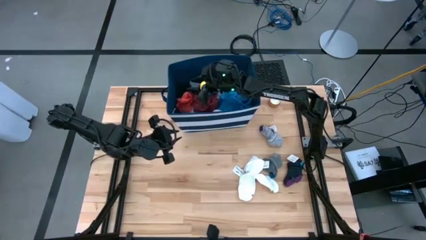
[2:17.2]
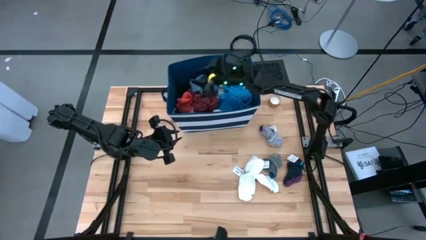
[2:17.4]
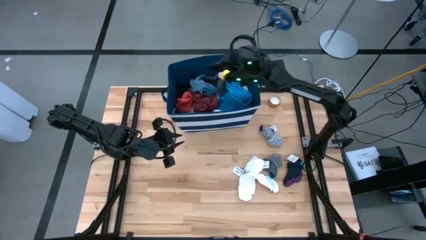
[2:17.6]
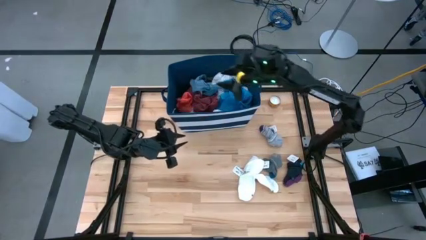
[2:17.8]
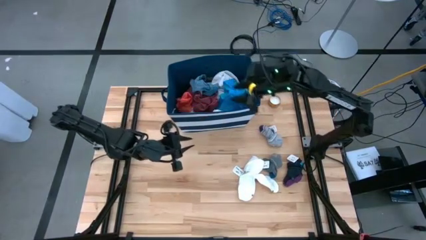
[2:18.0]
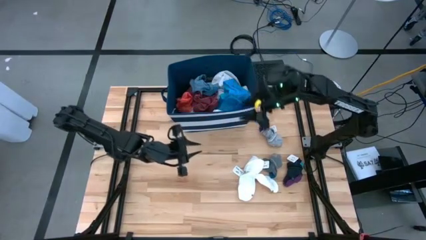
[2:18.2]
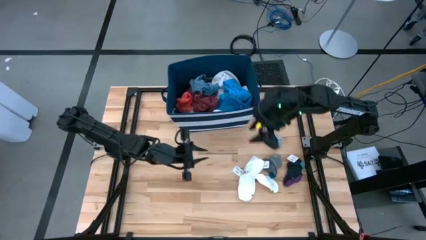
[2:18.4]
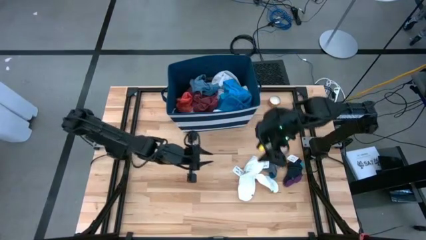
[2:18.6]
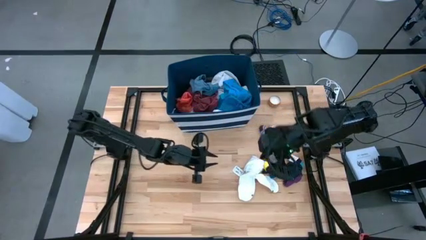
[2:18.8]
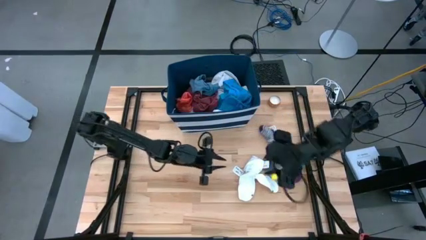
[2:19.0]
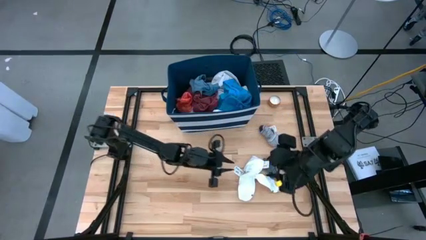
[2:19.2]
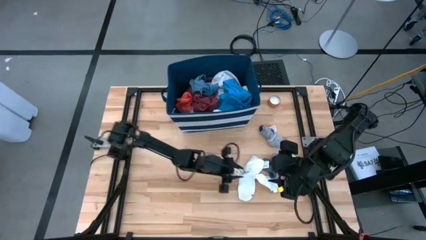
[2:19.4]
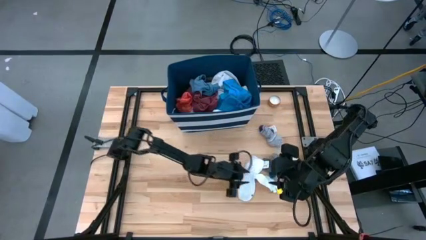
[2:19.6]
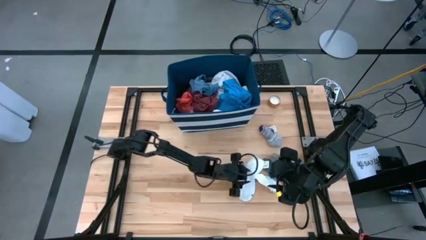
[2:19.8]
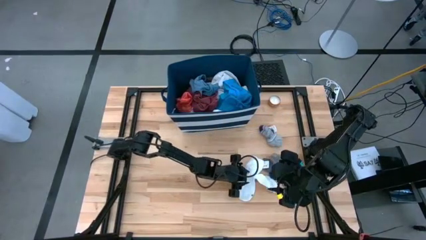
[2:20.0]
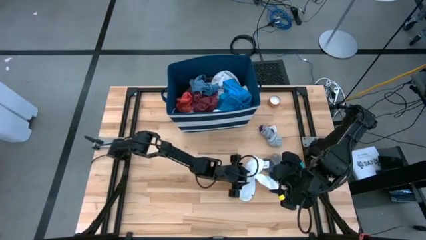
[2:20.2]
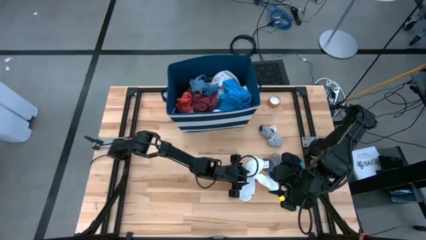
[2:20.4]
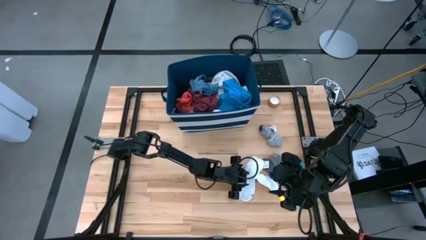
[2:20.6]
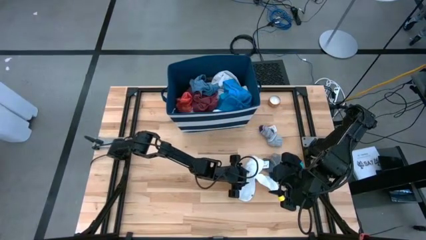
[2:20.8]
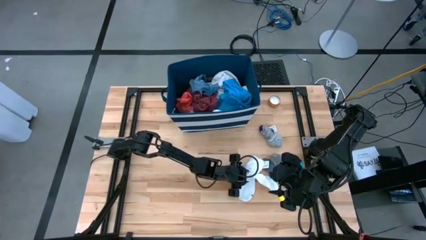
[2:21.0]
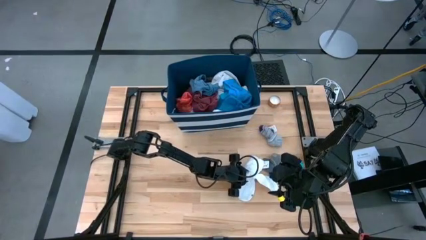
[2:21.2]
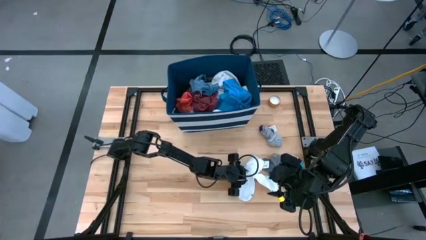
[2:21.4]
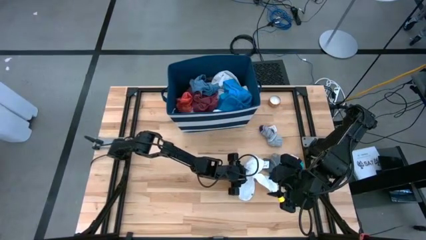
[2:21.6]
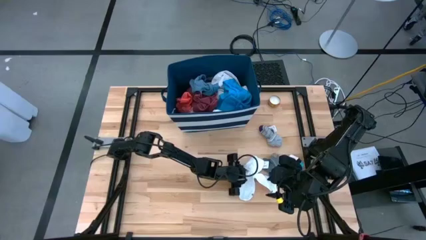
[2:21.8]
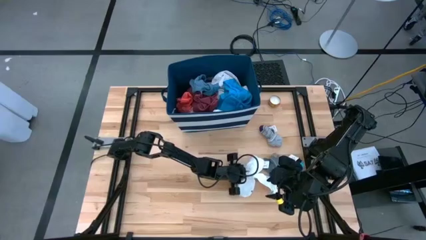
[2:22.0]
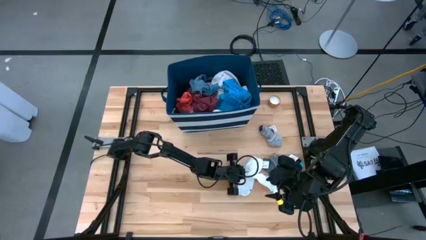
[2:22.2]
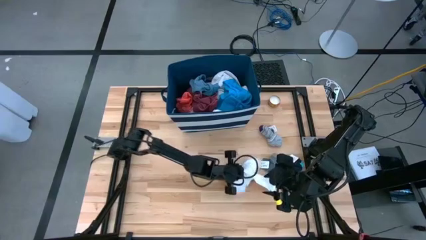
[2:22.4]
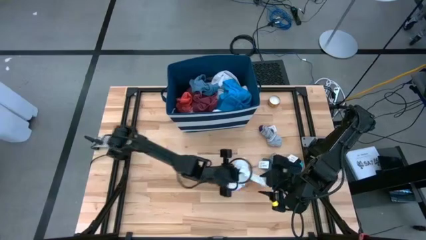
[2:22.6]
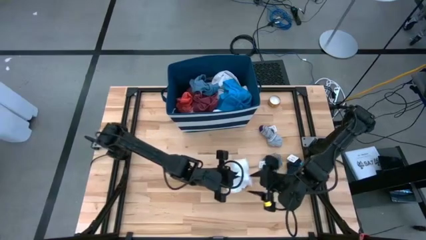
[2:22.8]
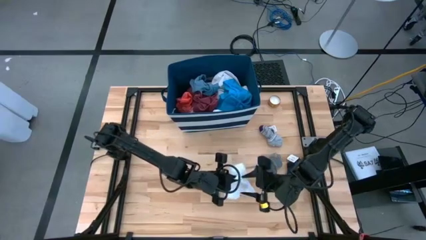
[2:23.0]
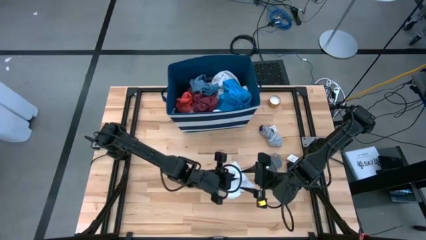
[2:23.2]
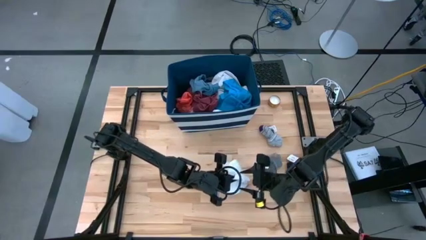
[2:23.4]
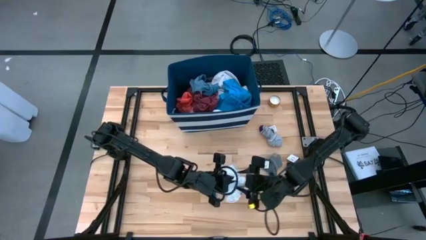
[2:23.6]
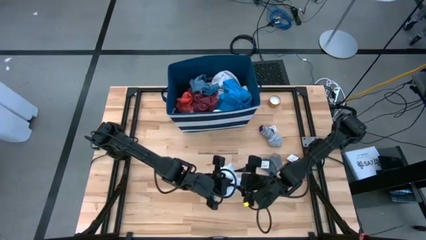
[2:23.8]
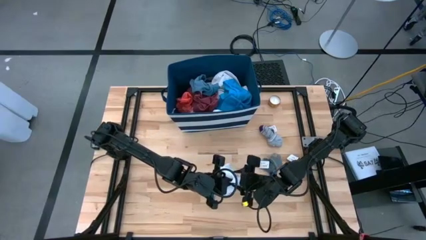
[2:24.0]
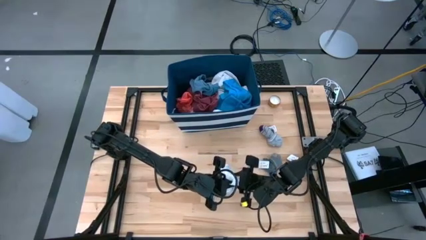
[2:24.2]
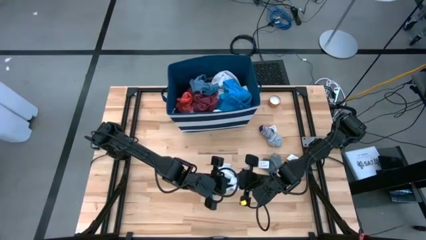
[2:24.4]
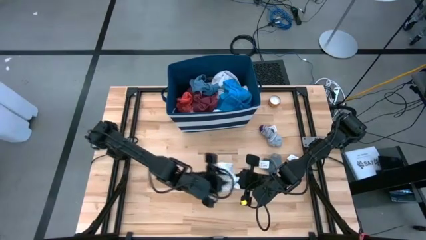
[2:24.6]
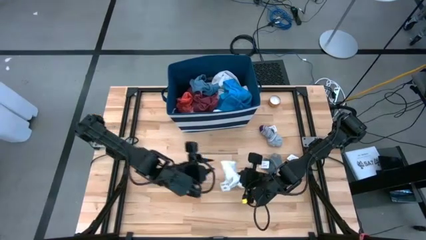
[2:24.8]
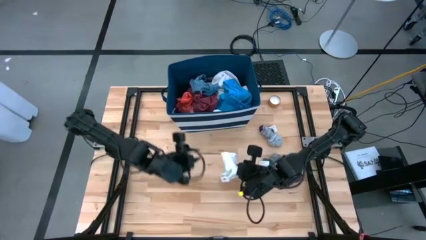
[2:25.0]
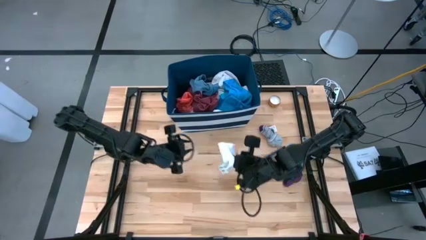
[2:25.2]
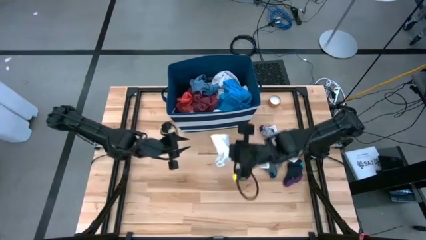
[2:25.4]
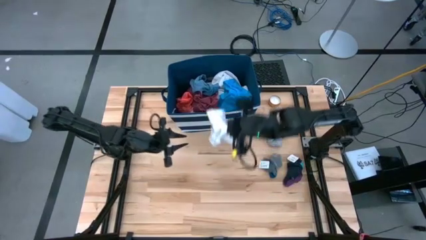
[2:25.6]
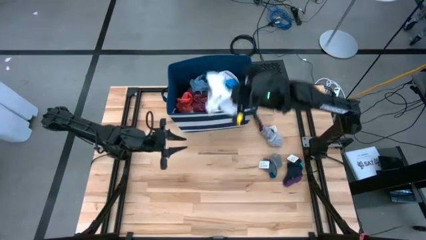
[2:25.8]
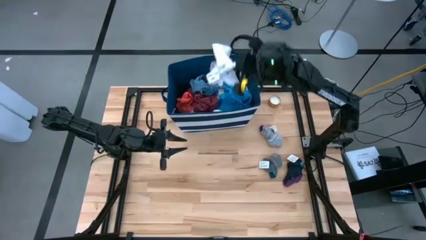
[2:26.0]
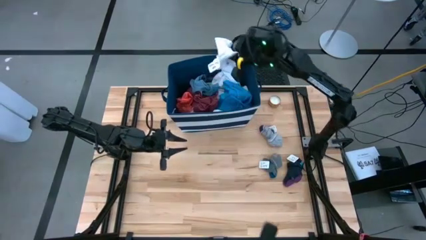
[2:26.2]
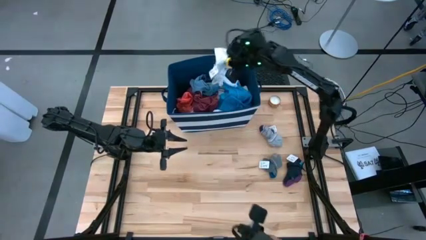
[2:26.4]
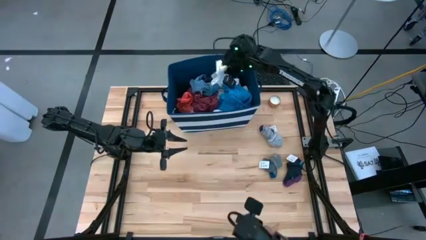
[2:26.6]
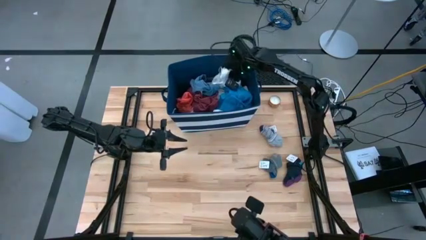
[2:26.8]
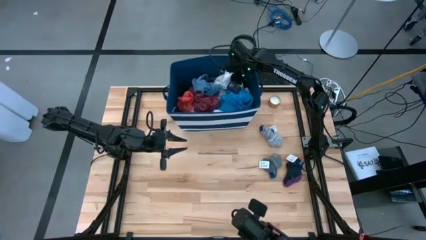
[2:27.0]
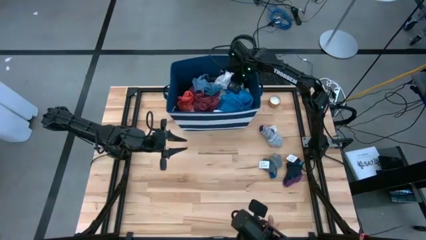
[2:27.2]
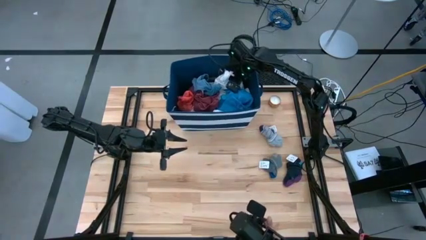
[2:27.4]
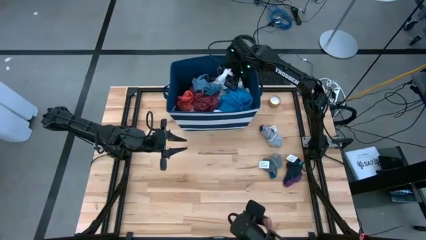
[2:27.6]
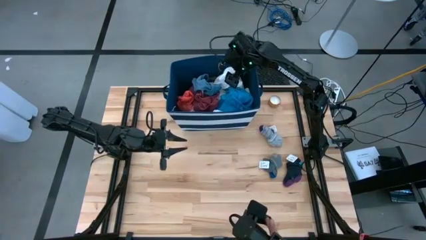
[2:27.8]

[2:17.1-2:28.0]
Task: Sort clothes
Put the white socks into the blue laundry organizer

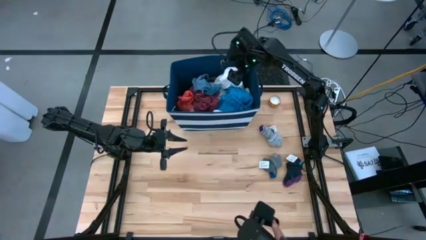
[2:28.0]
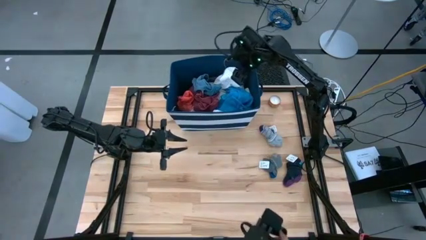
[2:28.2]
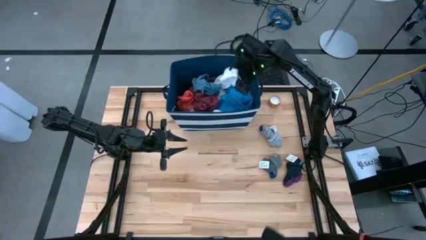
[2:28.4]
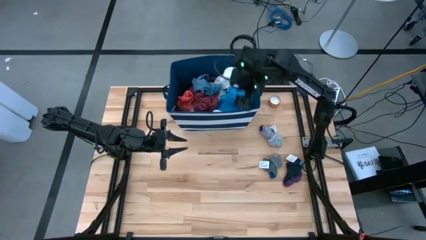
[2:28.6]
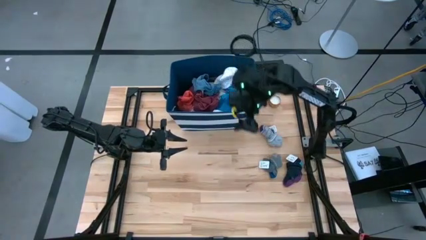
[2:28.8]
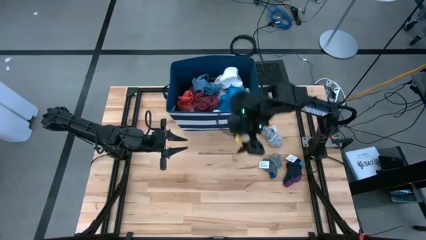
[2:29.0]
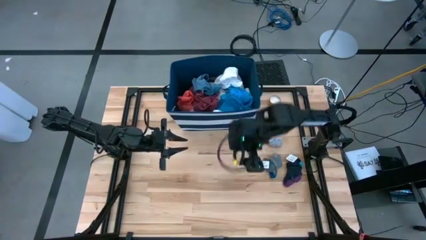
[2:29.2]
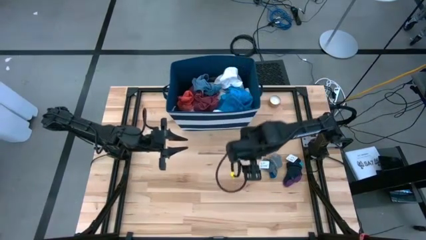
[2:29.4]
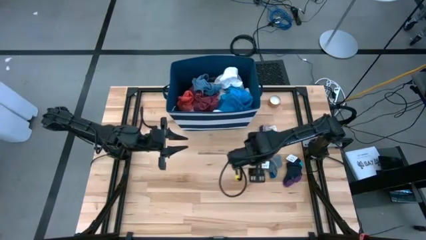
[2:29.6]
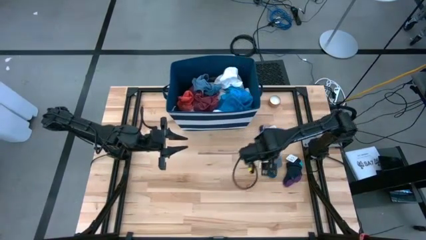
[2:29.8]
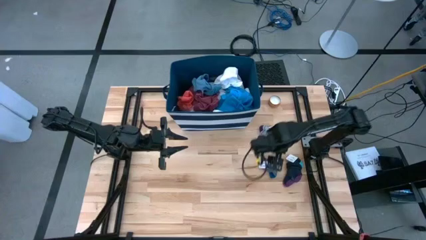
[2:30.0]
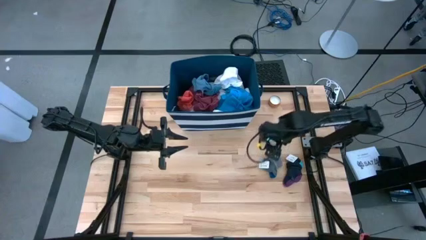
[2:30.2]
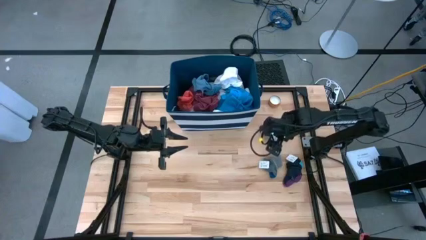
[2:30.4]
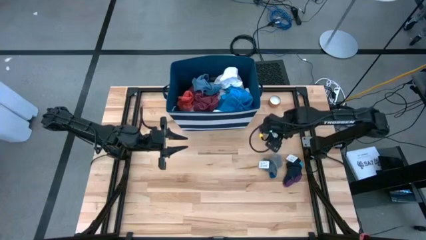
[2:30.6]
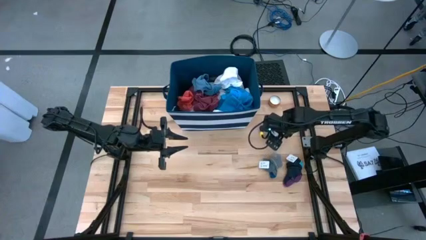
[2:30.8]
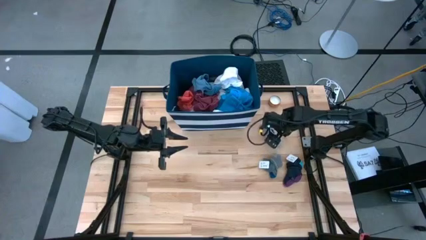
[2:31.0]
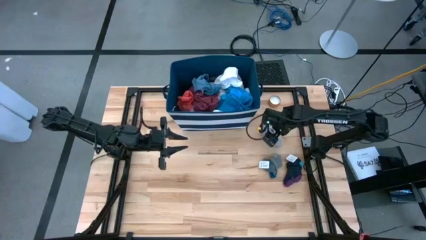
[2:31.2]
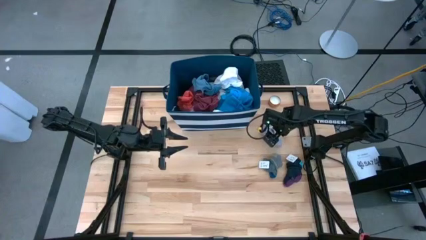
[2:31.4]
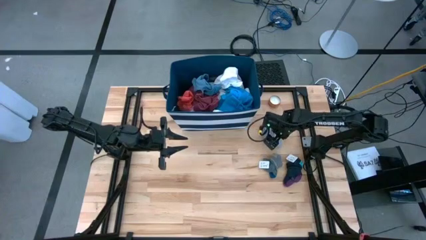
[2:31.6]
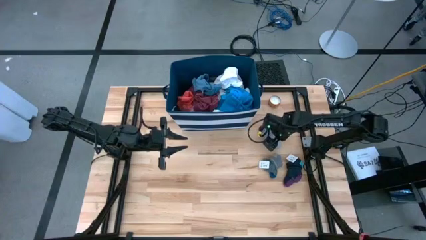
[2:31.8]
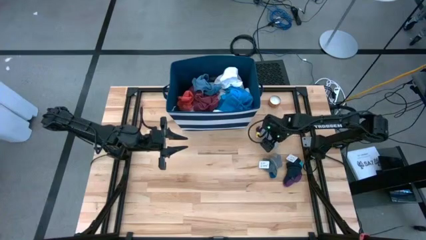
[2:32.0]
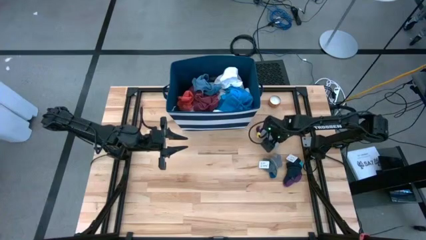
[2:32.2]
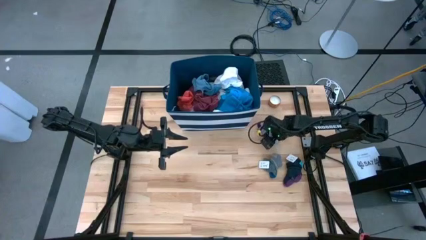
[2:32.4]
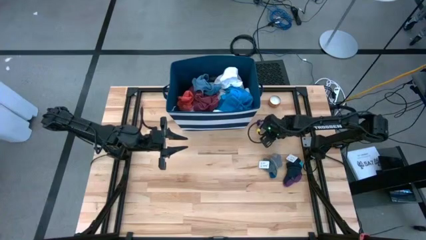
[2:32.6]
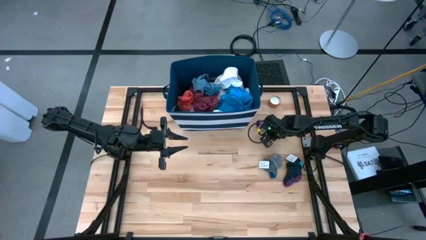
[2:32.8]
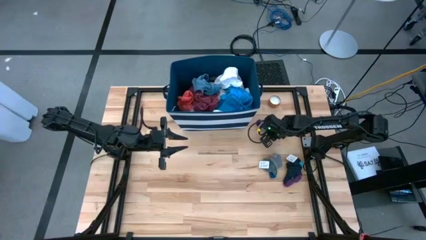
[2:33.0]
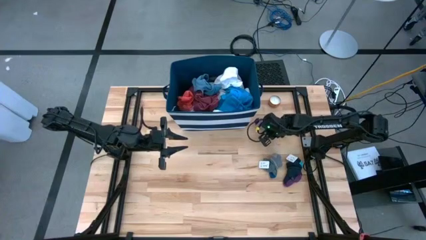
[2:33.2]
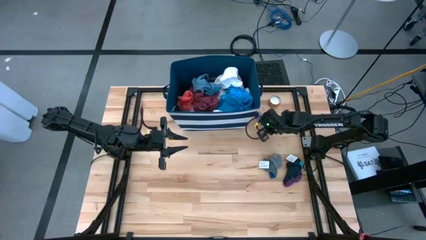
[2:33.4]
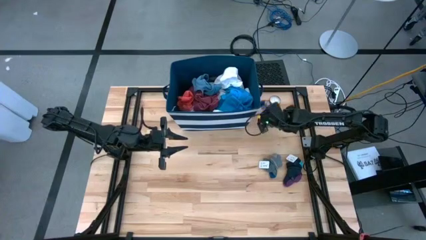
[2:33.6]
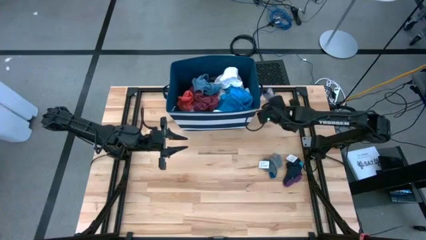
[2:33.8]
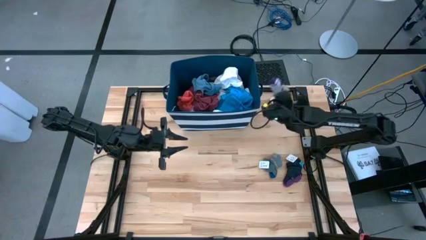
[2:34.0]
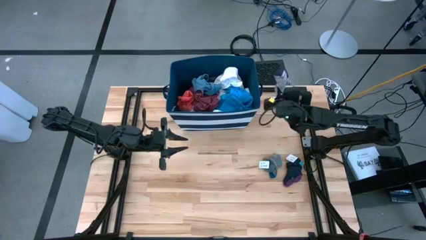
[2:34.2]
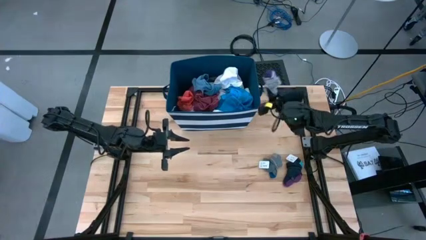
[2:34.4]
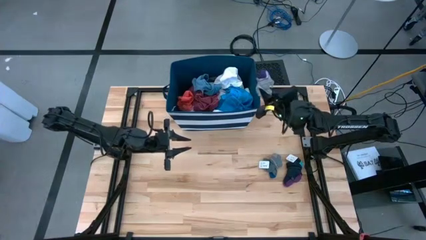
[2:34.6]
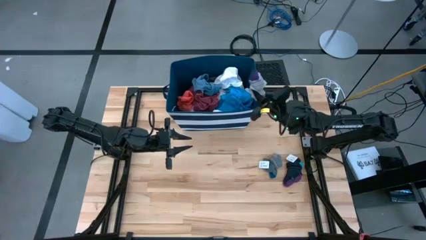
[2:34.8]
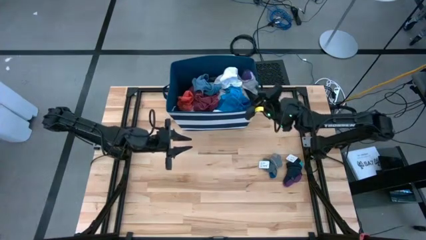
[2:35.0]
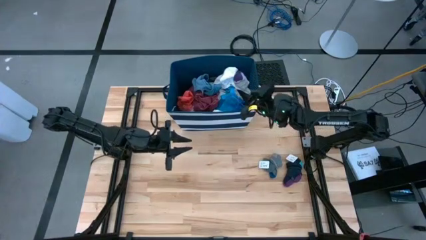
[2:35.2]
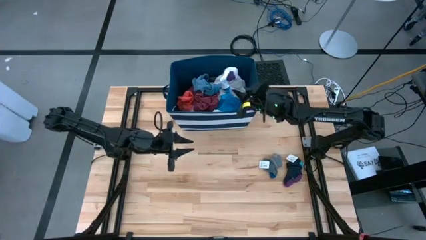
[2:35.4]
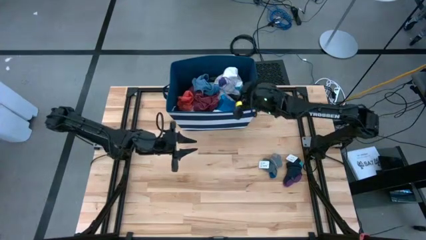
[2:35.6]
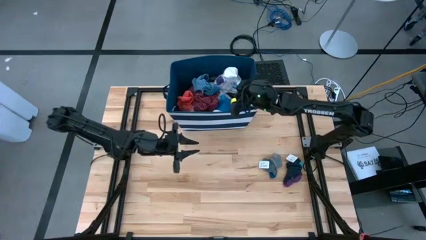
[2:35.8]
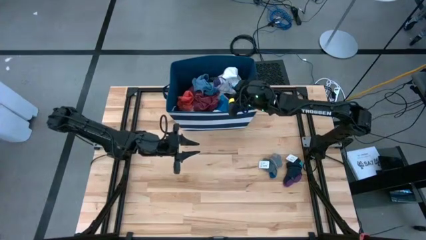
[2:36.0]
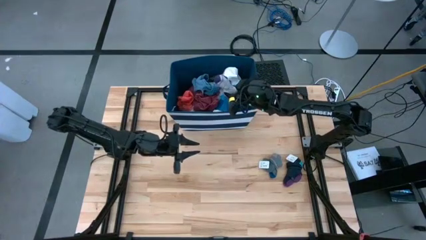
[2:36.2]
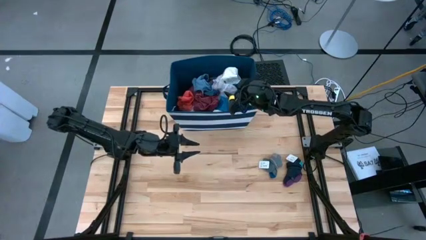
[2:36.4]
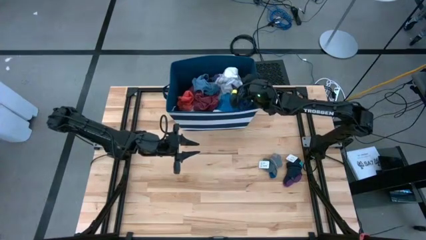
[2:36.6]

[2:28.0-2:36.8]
Put the purple socks into the blue laundry organizer
